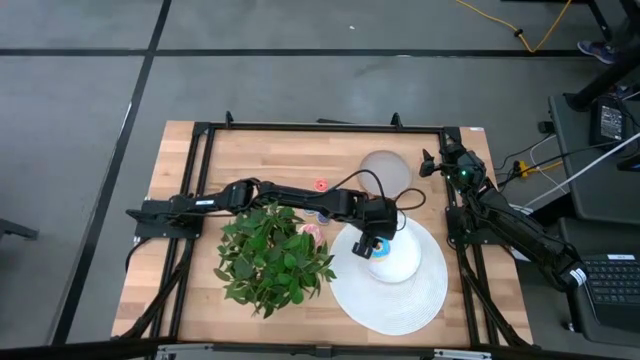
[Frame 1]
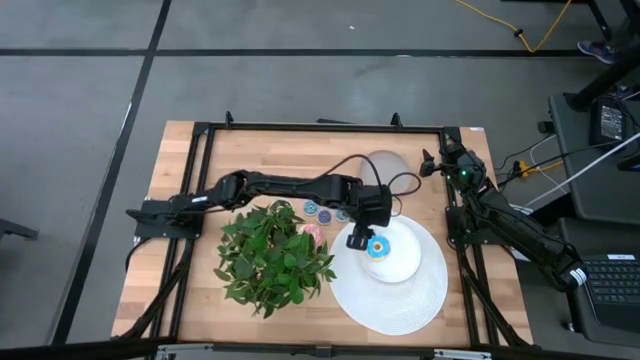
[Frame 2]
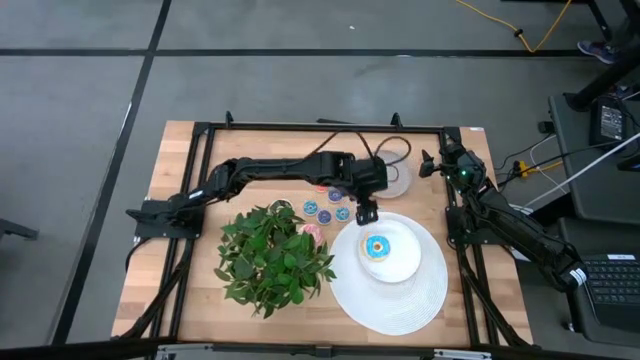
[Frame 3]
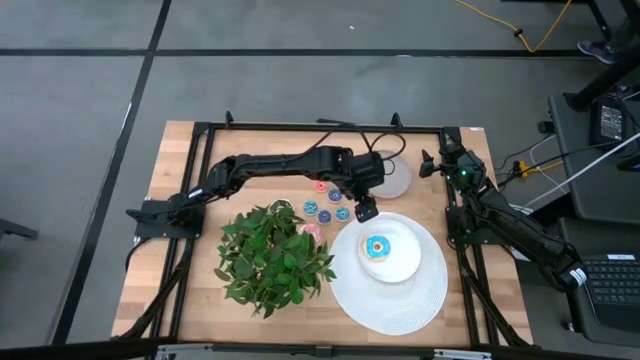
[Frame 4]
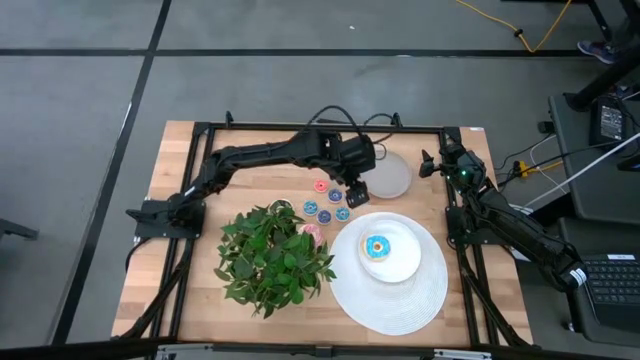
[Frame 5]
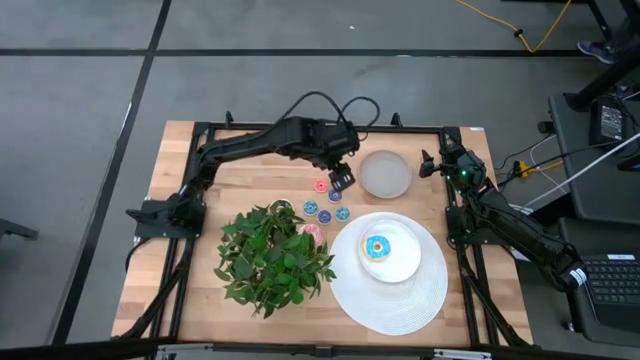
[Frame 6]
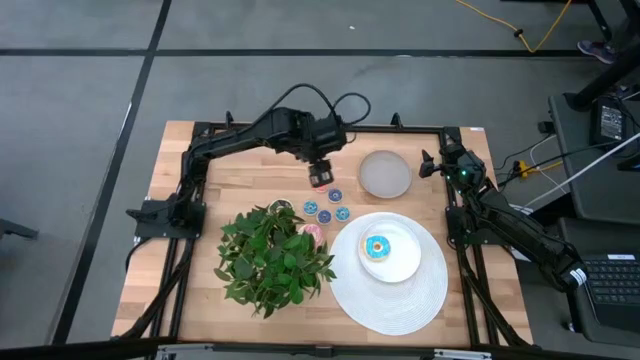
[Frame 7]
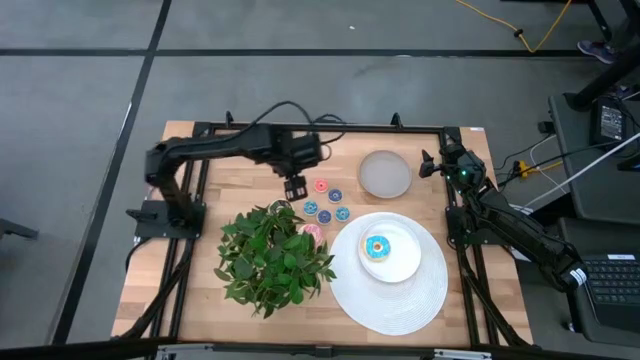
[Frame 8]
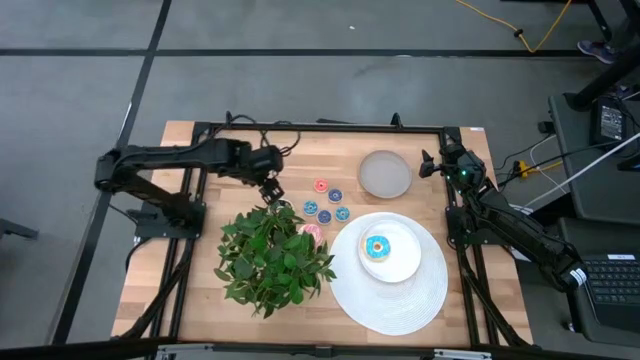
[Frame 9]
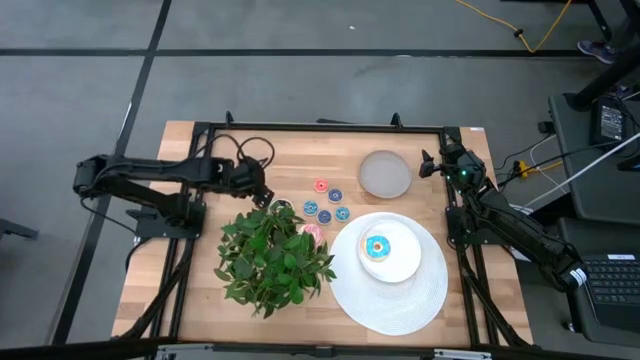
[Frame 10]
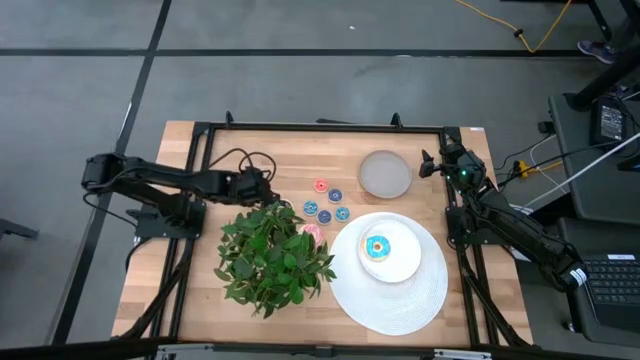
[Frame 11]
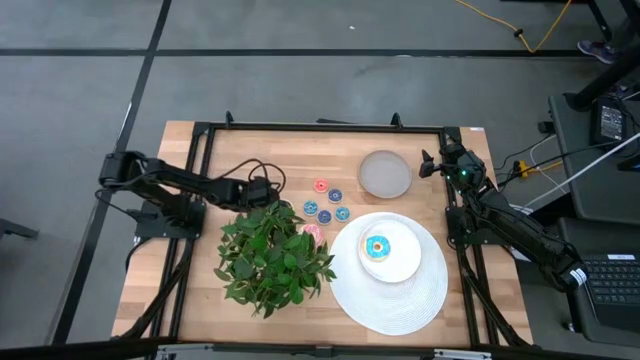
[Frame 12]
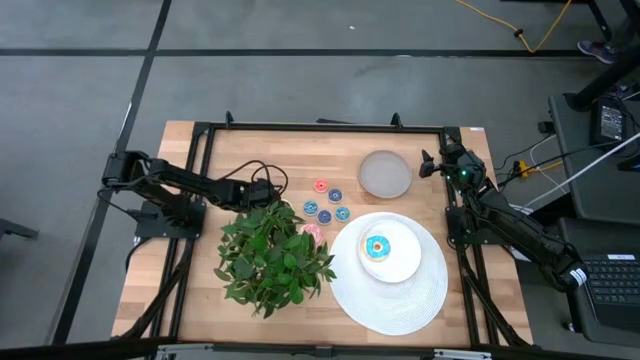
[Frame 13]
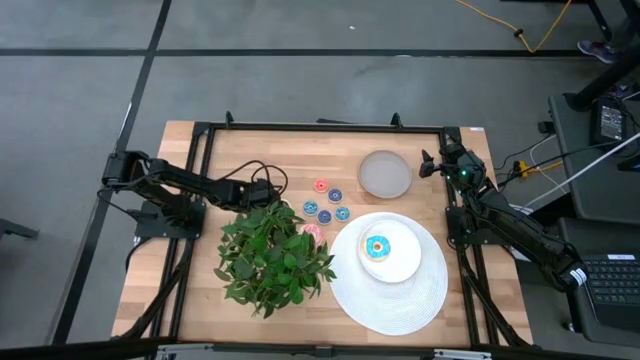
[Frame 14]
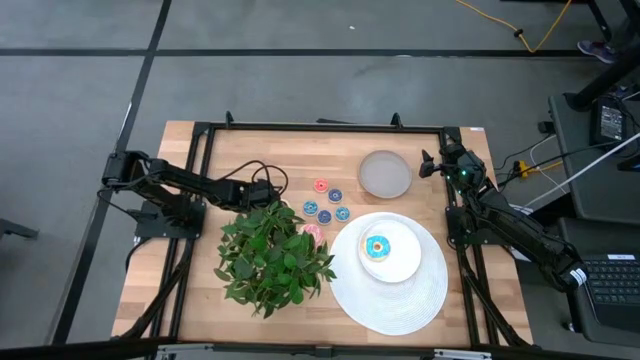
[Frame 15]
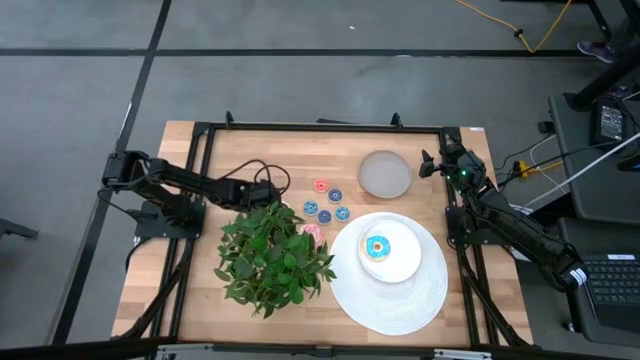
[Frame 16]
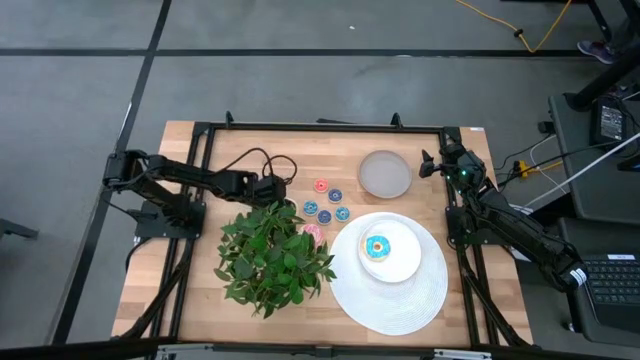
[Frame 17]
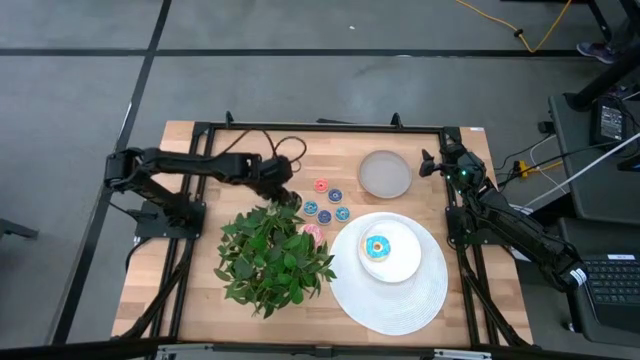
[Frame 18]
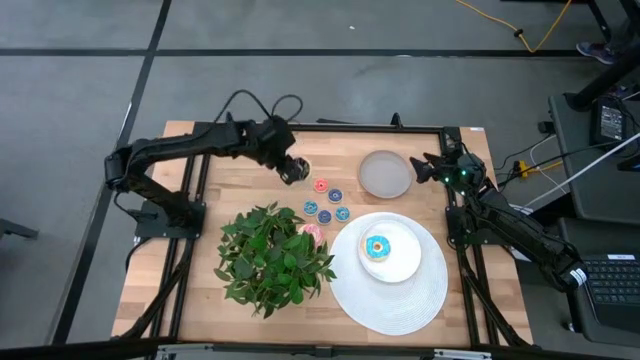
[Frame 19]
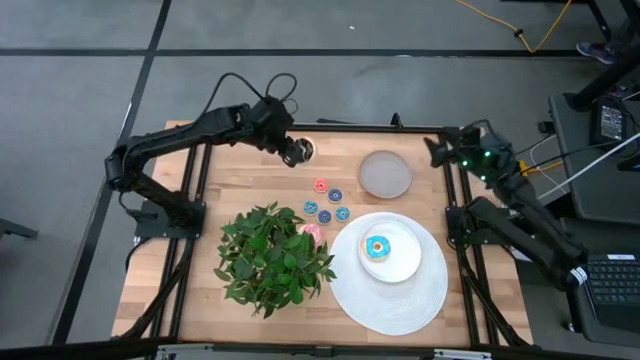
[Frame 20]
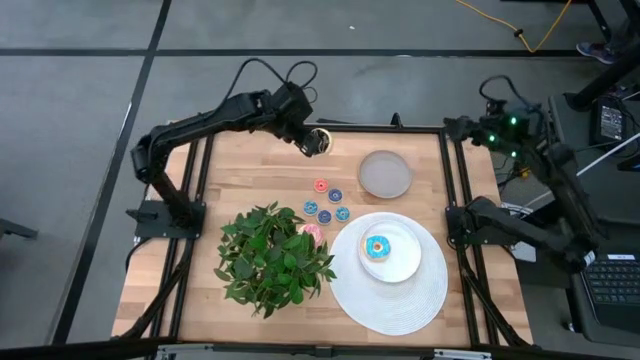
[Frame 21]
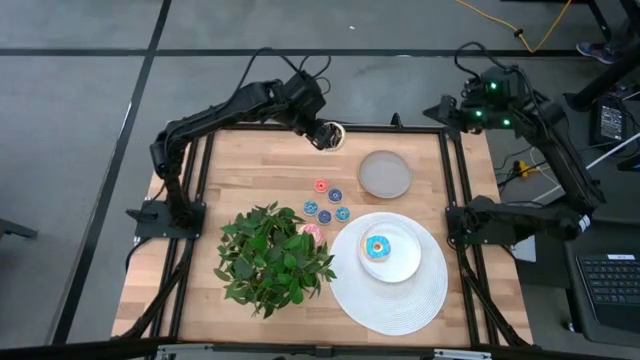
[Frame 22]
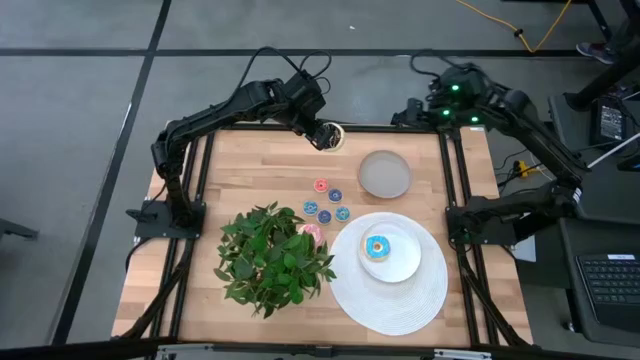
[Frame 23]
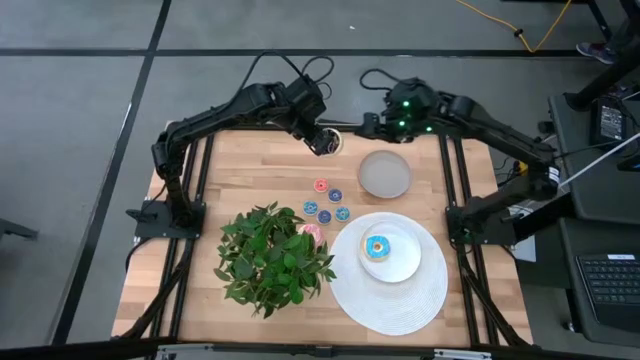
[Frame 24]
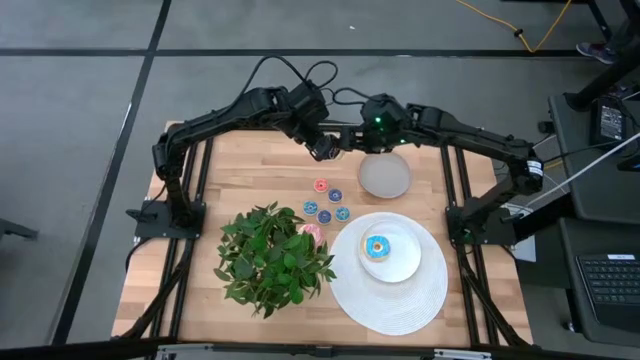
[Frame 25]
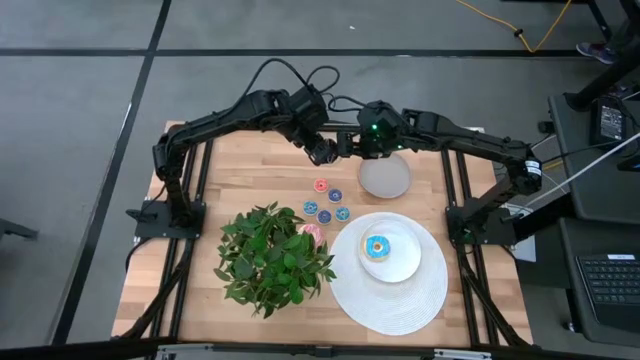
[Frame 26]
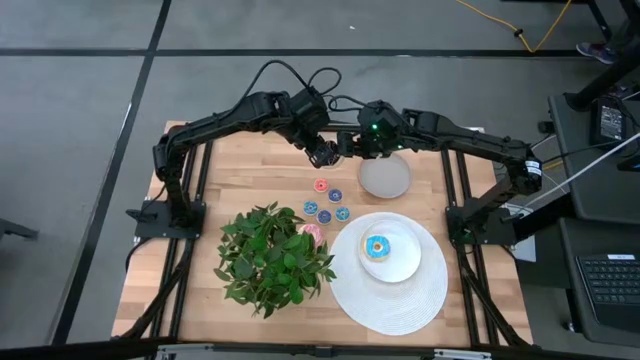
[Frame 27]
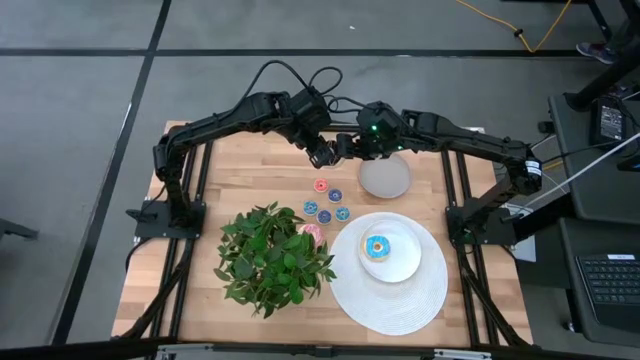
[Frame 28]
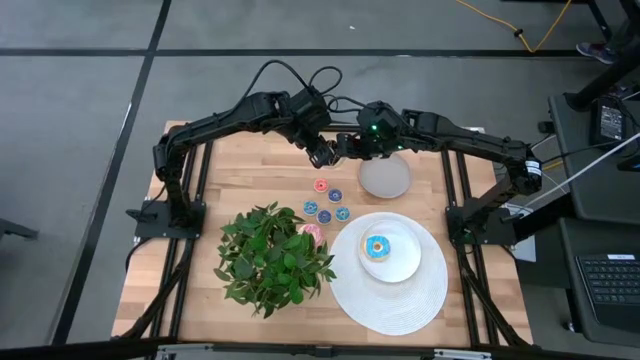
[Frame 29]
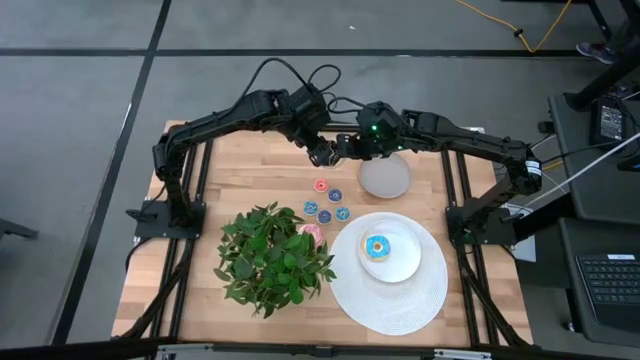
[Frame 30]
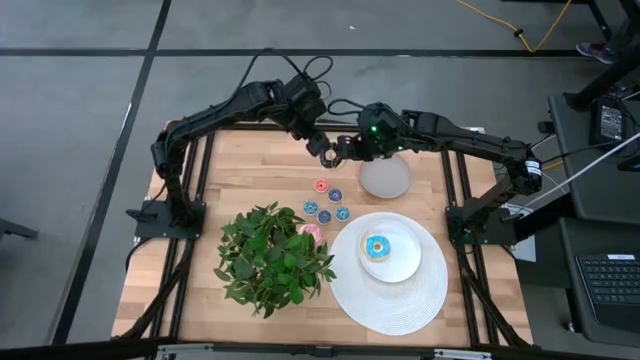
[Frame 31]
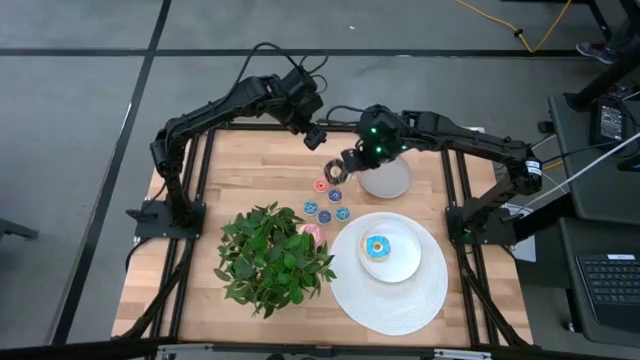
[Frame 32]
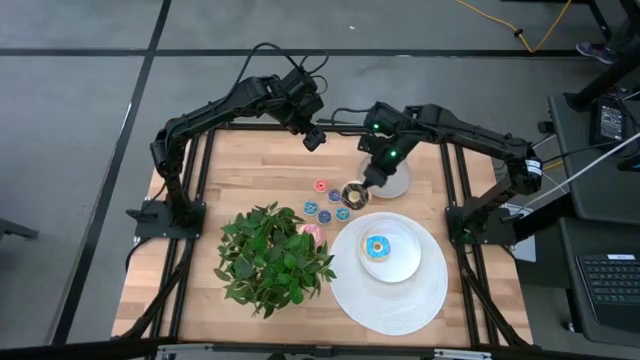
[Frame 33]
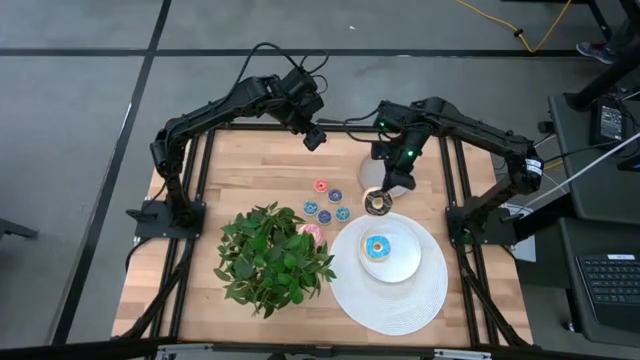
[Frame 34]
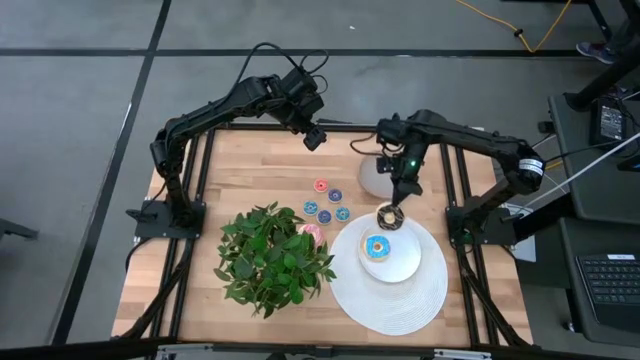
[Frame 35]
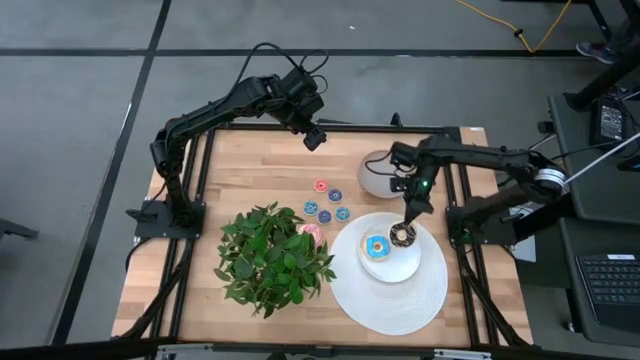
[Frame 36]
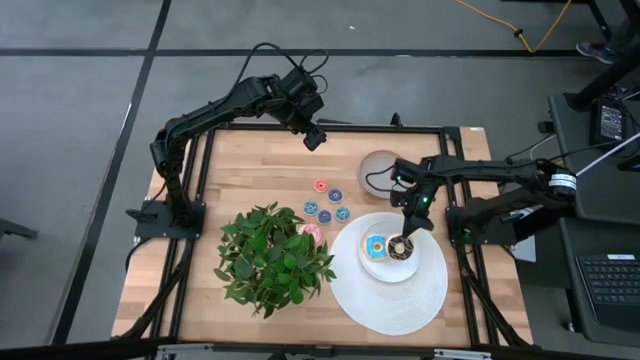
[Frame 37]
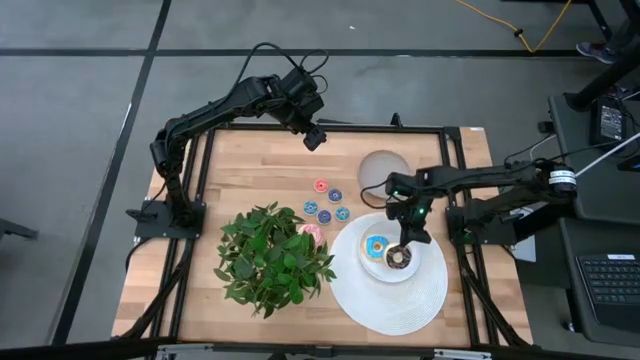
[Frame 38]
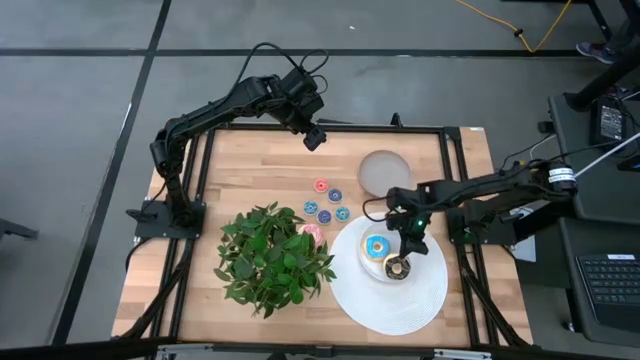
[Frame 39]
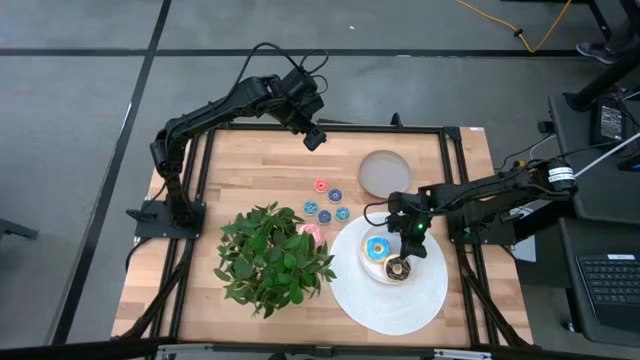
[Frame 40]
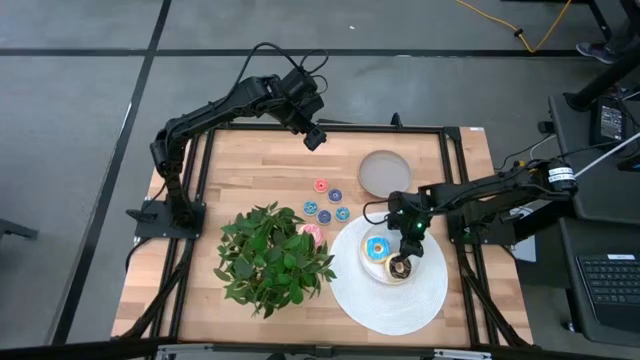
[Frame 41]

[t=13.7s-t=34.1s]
Task: Pick & Place donuts
Put the large black donut onto the white plate
